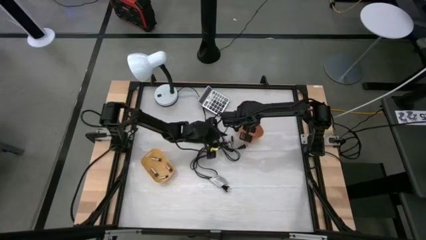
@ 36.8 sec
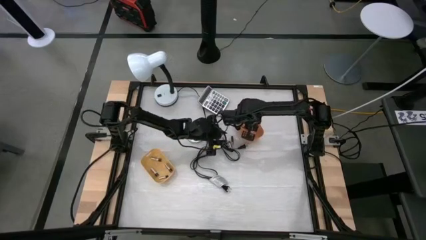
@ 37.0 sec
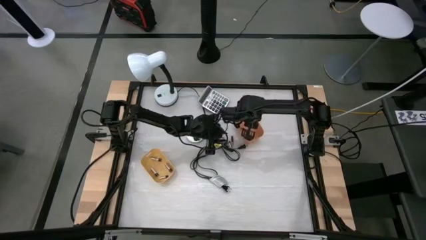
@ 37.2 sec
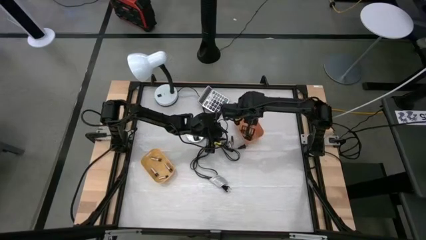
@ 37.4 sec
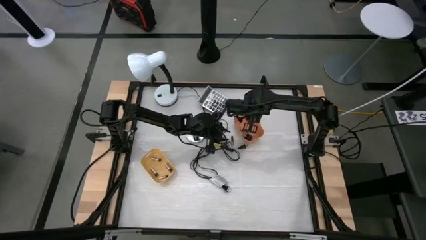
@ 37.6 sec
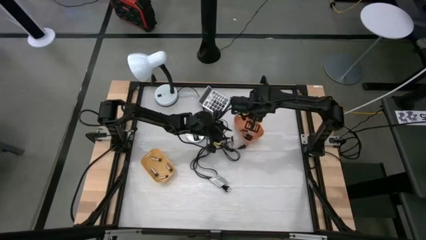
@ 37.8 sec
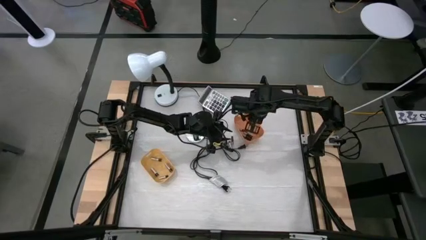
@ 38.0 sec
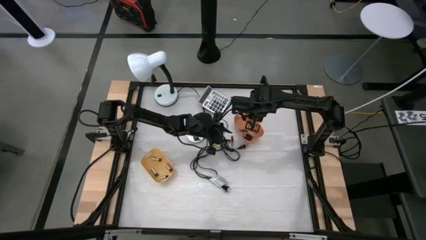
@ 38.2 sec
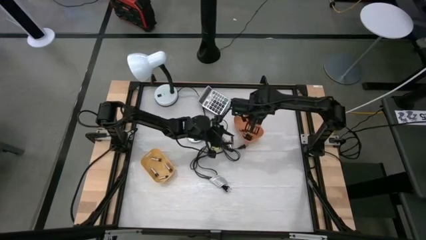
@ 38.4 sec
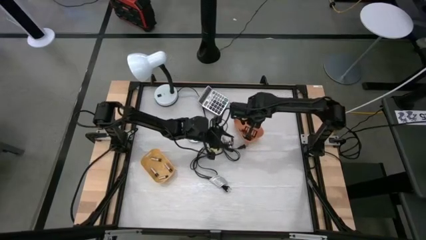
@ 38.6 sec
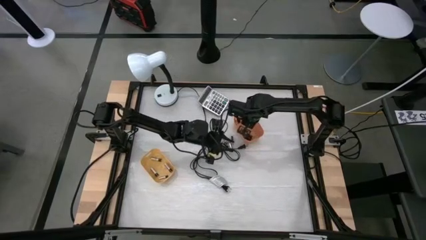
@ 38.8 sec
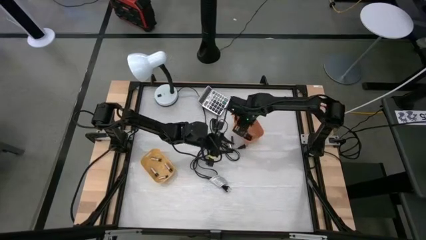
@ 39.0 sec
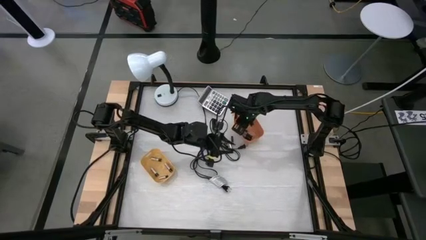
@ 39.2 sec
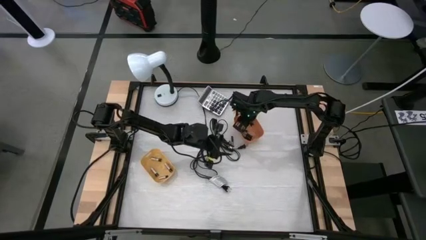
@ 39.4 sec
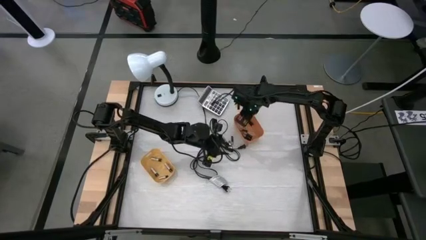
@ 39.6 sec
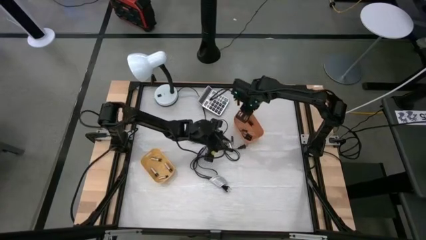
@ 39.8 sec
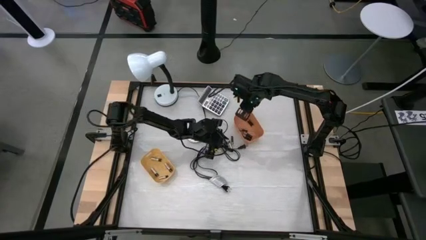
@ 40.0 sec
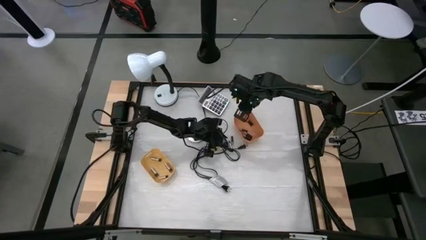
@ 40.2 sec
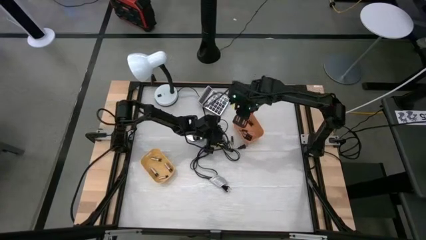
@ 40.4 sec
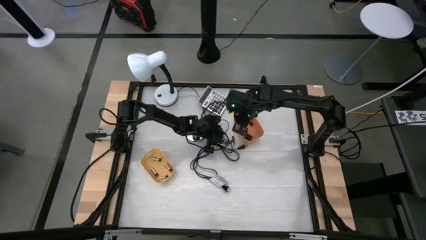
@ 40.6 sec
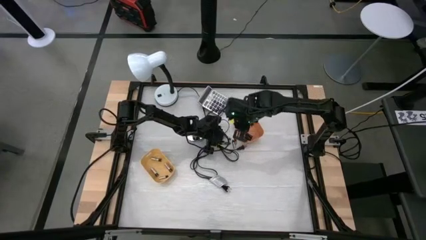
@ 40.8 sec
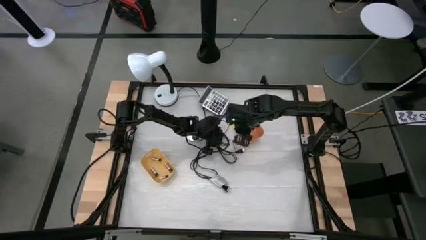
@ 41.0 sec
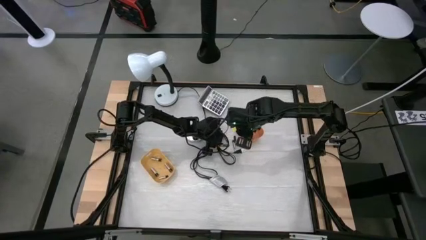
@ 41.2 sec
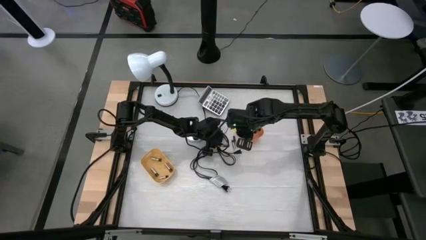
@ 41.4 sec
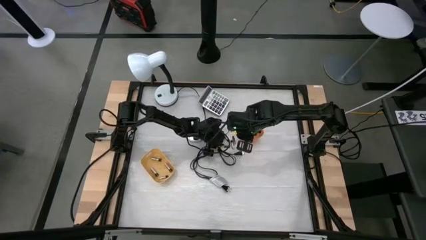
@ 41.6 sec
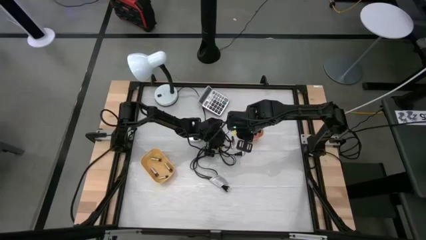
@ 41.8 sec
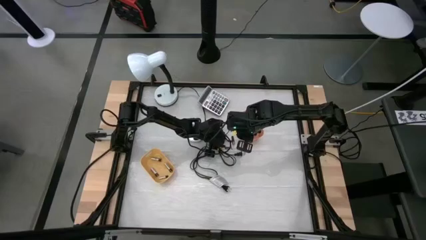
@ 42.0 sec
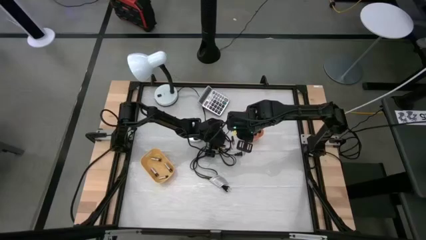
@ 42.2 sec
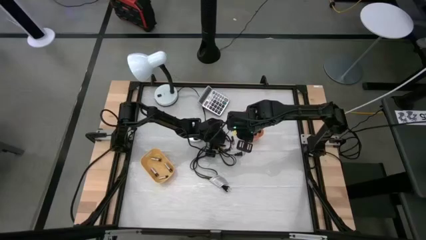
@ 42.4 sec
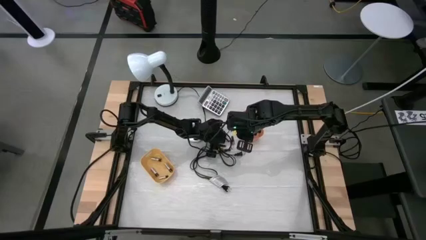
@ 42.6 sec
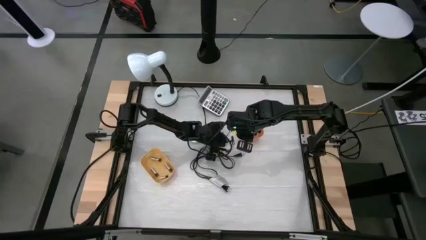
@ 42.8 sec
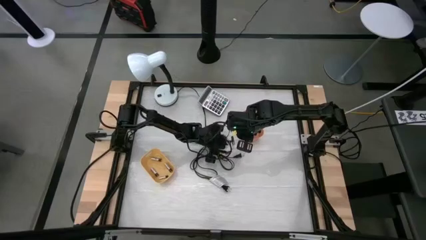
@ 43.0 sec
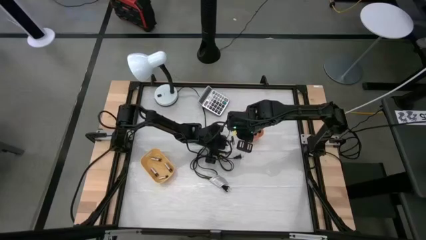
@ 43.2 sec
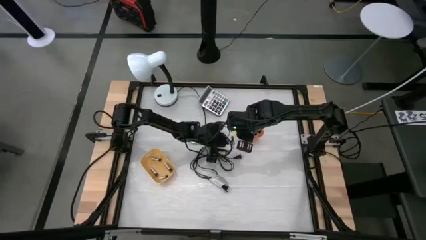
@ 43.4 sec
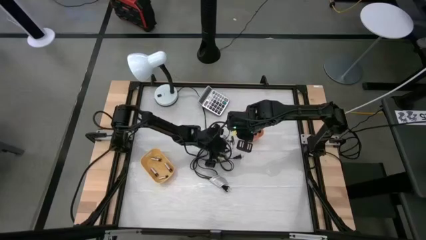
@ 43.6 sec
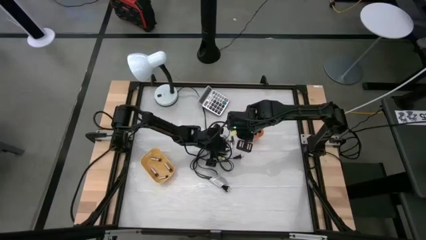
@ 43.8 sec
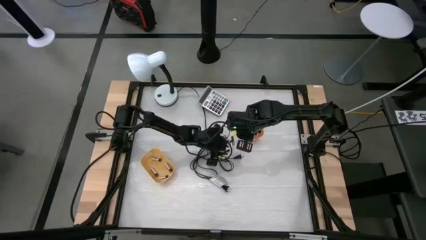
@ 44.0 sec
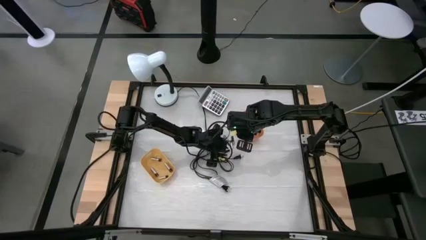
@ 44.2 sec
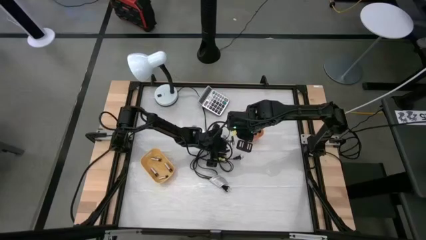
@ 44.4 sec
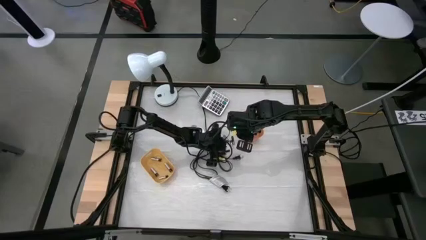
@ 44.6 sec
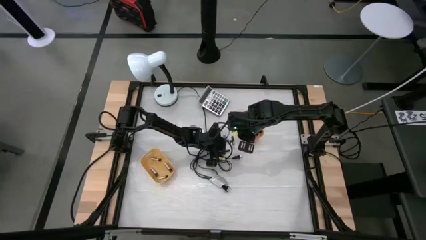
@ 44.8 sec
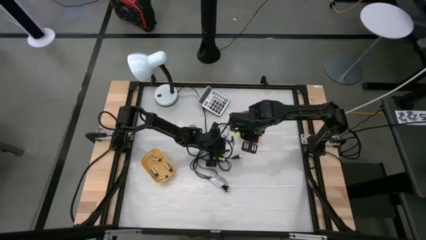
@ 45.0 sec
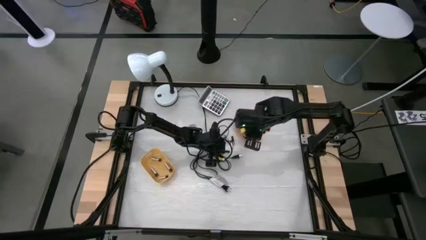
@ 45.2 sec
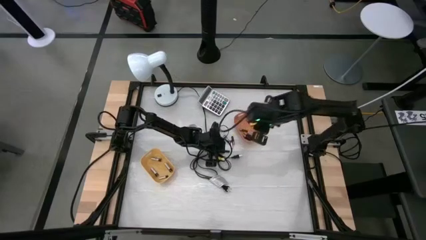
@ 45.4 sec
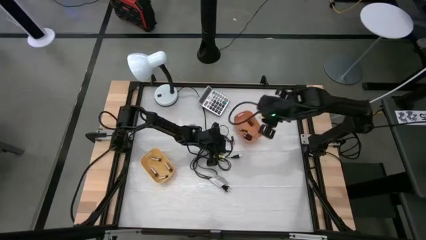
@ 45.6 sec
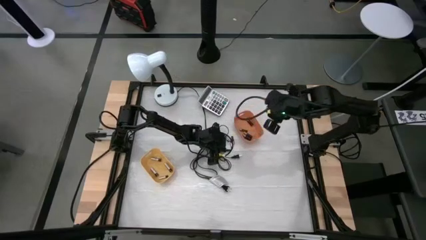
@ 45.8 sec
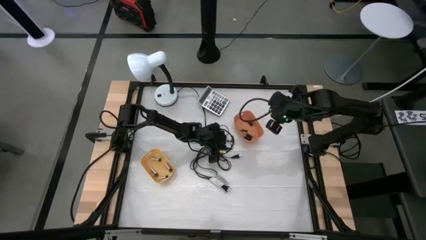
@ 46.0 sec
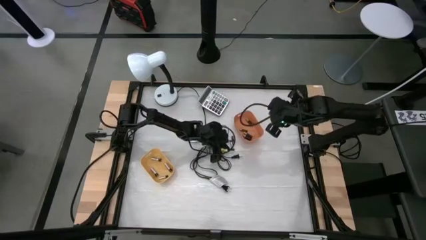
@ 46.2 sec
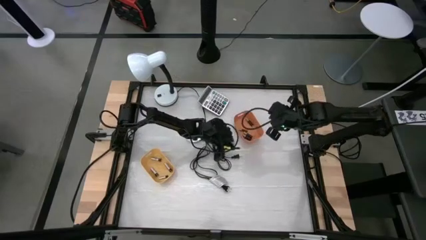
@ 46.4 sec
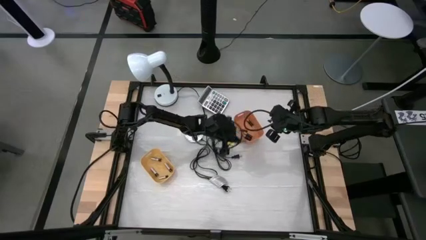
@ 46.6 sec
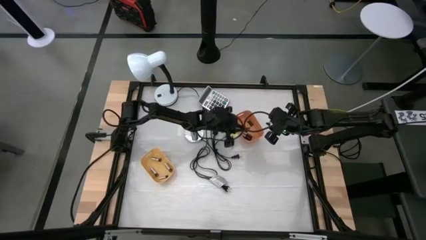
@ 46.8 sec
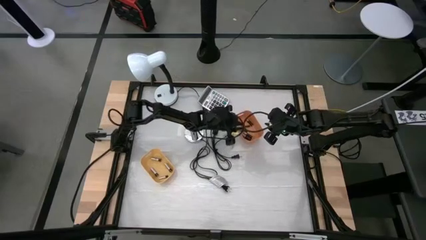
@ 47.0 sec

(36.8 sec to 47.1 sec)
Task: Sort batteries
Put the brown battery into the orange bin

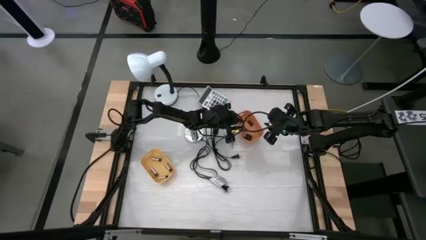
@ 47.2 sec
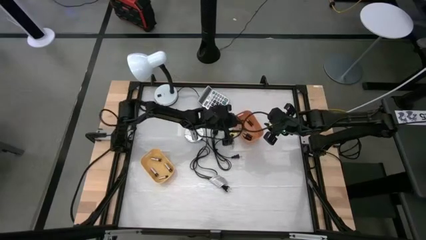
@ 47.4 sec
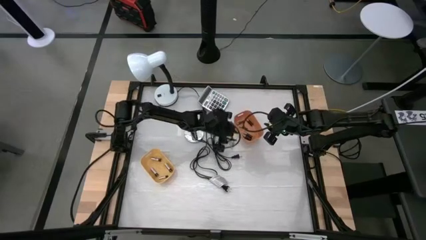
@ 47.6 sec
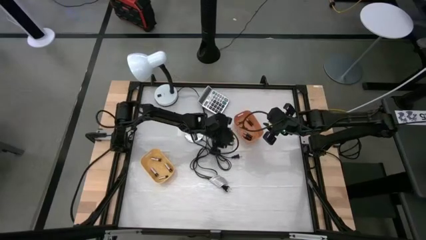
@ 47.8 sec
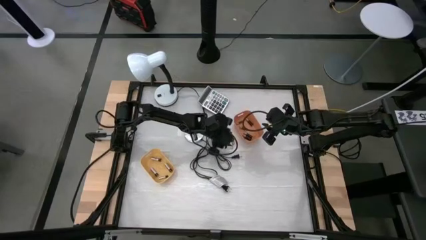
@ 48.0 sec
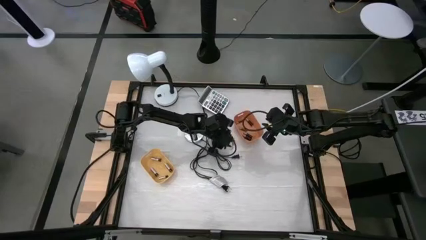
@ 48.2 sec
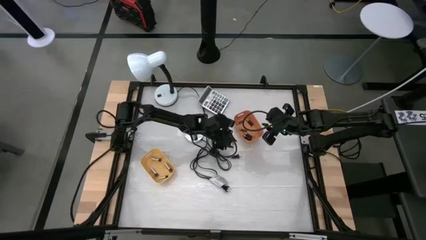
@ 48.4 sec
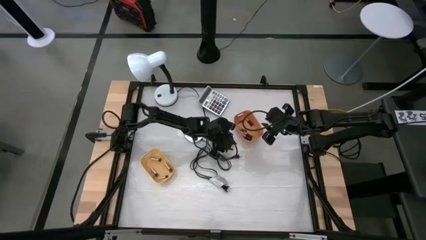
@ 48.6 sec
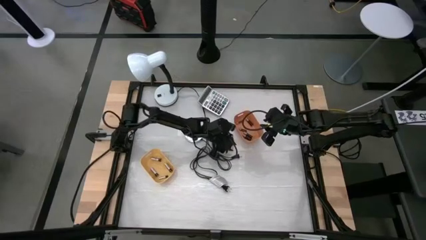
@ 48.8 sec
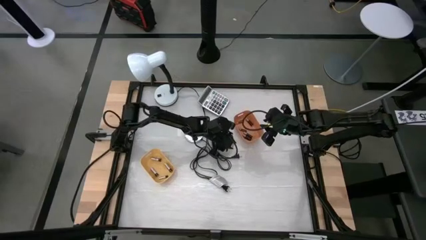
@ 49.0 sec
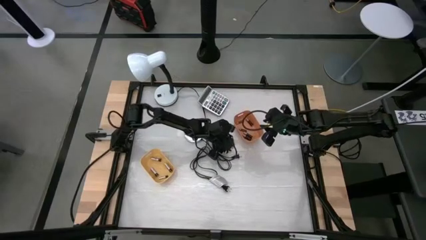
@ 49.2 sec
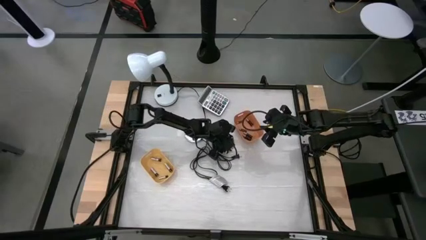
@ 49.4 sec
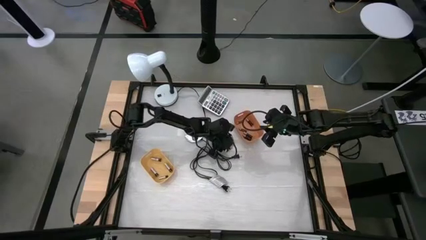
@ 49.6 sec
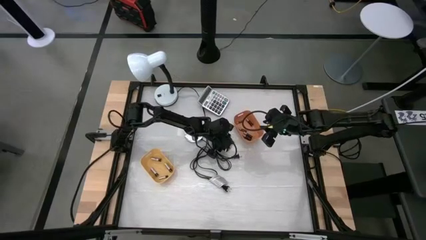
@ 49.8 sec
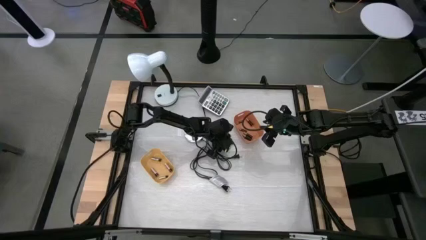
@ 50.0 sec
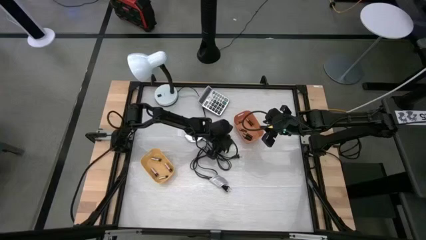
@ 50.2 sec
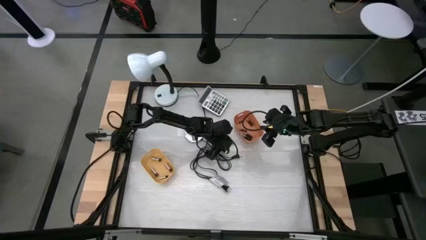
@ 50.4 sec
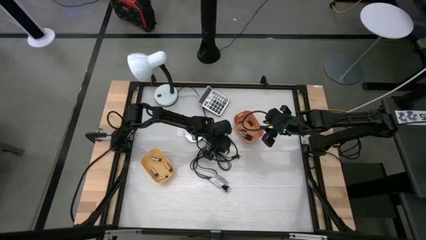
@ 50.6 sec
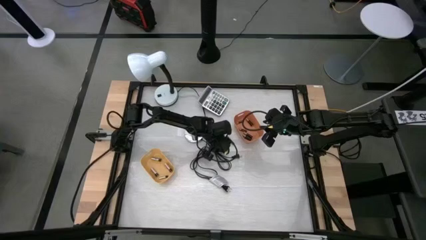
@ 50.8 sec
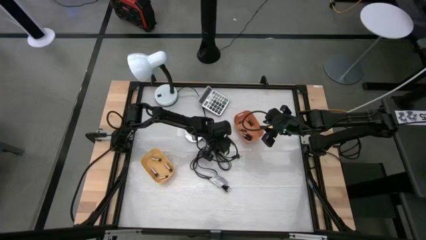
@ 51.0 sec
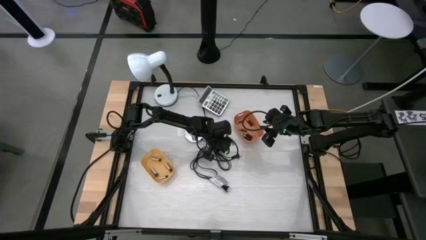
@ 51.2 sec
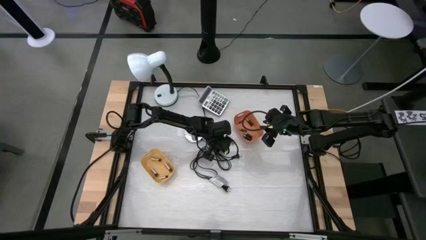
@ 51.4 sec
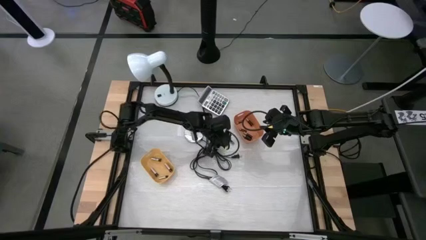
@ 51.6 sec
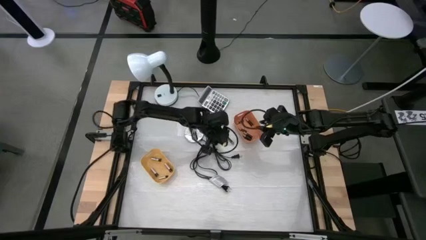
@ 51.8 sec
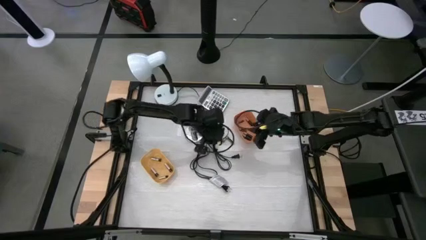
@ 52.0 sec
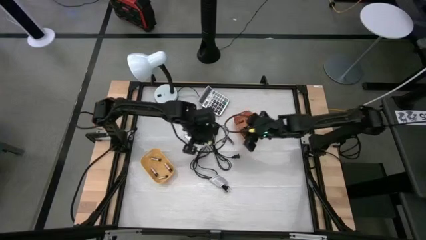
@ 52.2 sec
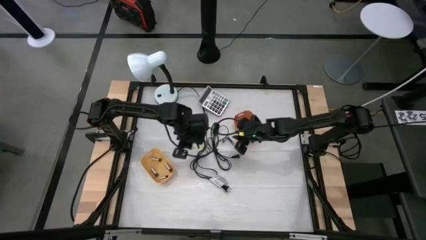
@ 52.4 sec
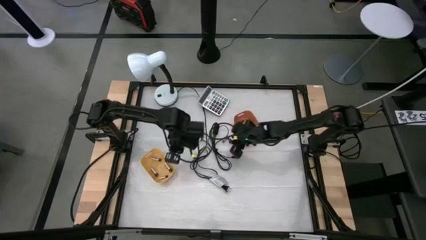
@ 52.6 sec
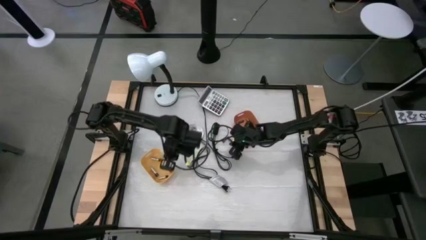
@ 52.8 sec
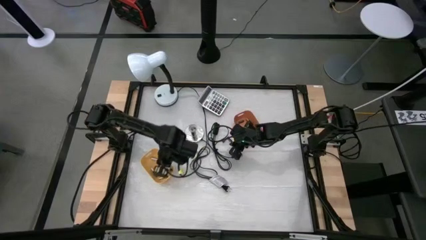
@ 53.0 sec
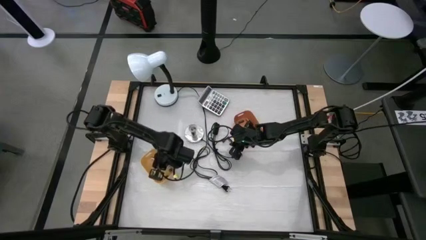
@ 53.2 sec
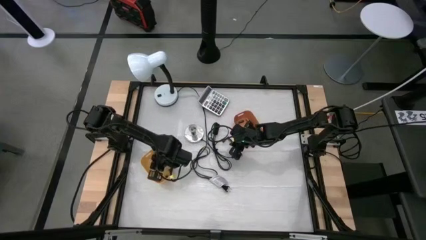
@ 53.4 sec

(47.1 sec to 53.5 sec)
Put the silver battery into the yellow bin
